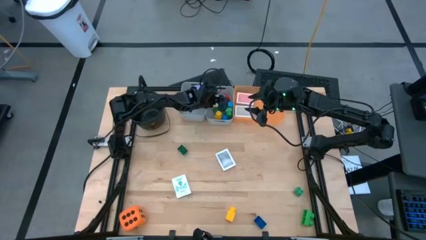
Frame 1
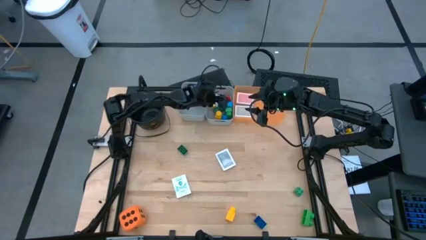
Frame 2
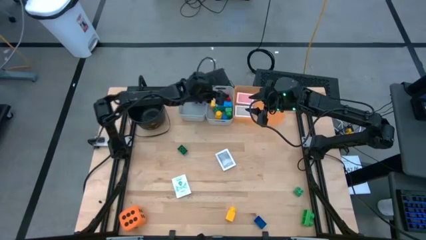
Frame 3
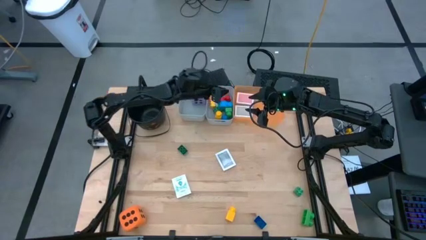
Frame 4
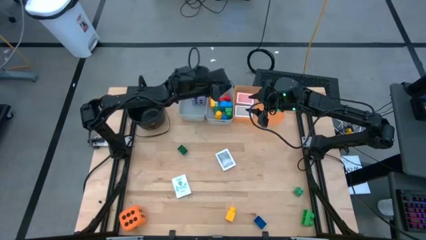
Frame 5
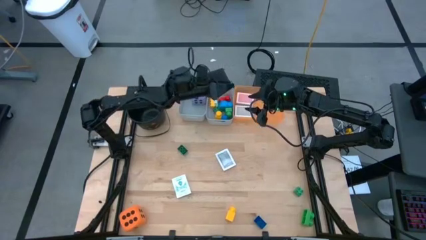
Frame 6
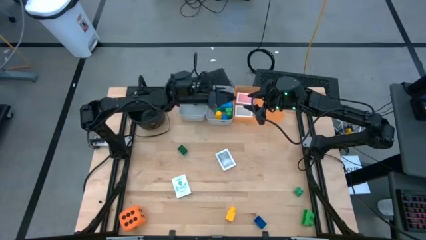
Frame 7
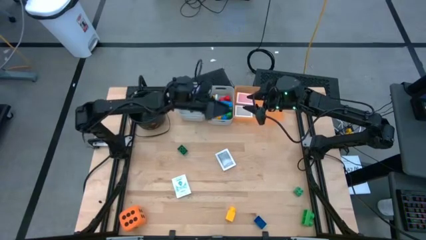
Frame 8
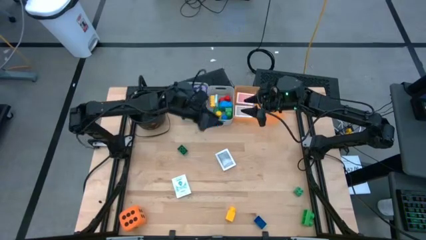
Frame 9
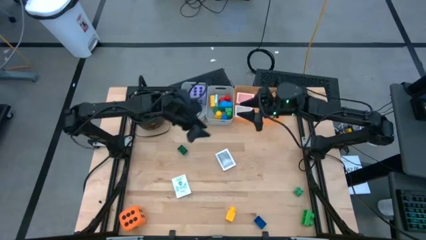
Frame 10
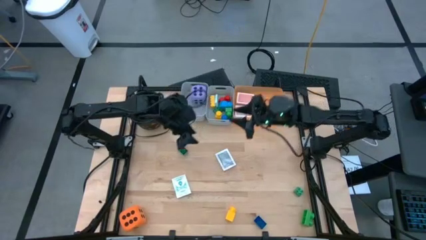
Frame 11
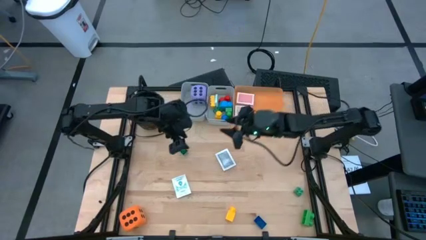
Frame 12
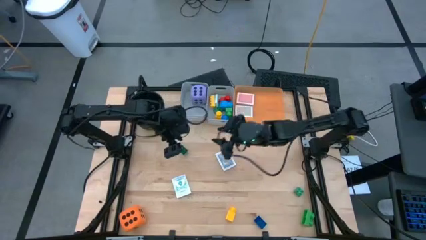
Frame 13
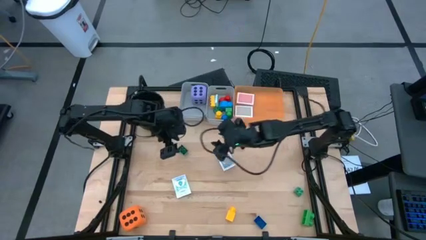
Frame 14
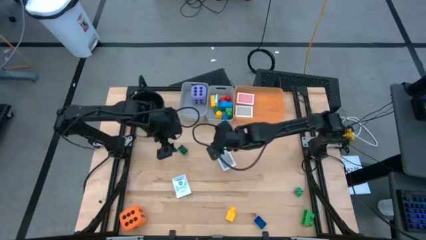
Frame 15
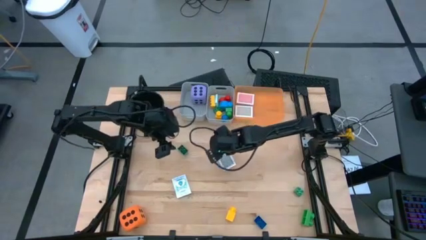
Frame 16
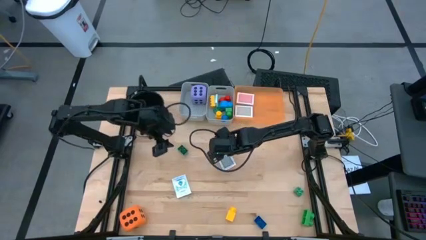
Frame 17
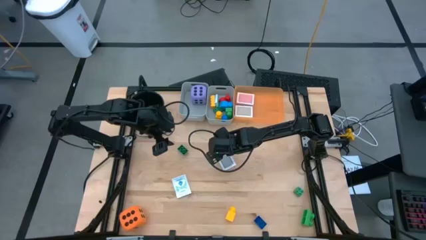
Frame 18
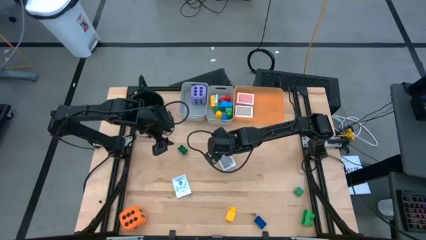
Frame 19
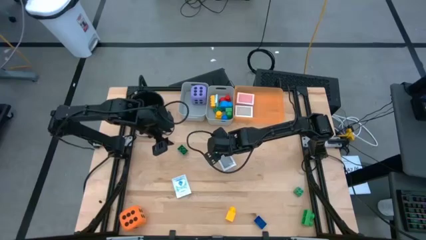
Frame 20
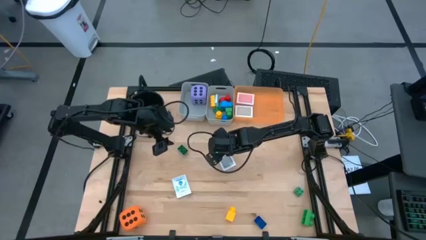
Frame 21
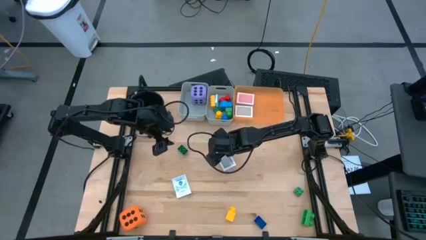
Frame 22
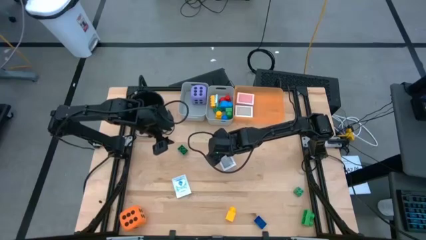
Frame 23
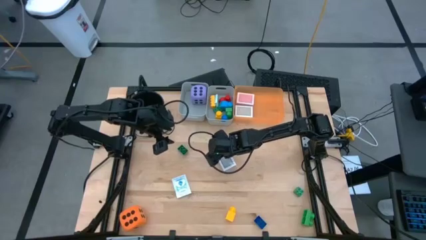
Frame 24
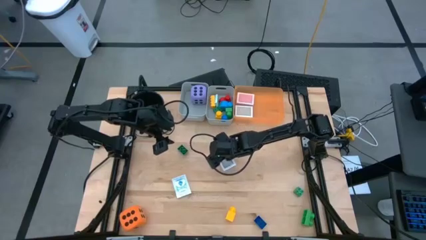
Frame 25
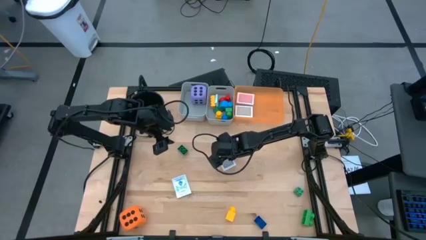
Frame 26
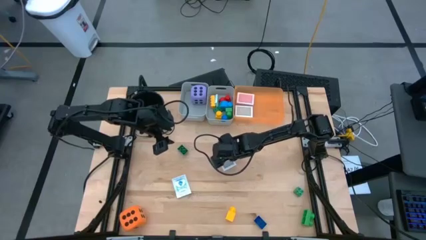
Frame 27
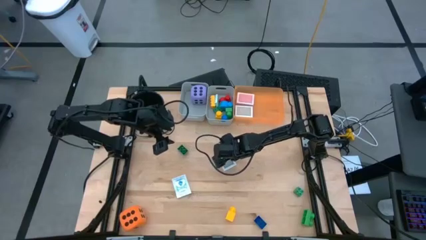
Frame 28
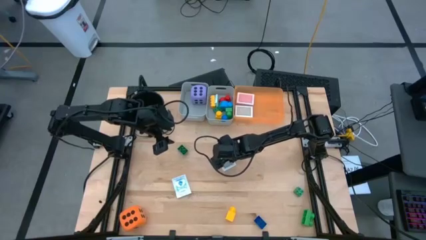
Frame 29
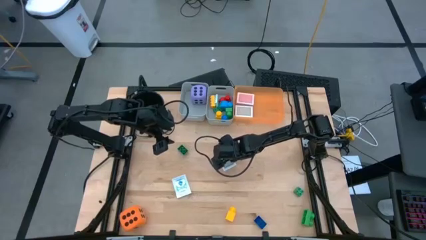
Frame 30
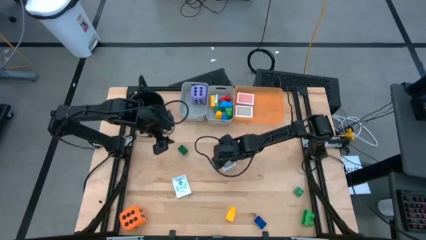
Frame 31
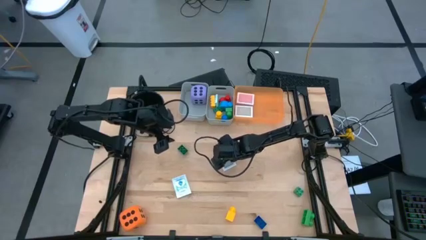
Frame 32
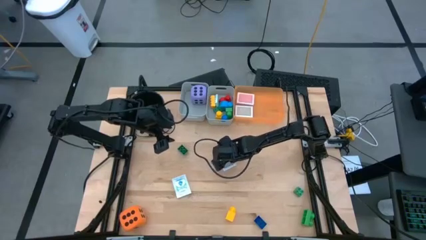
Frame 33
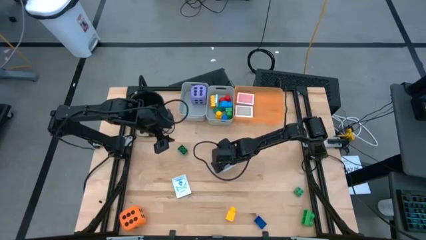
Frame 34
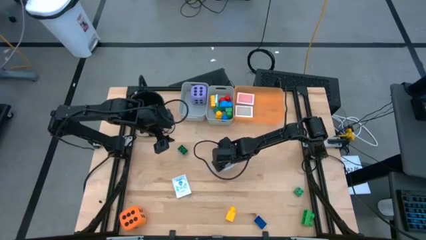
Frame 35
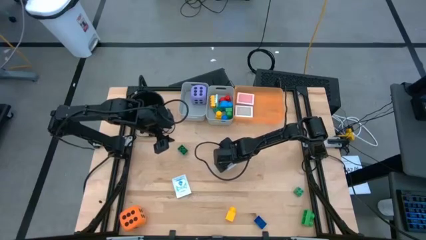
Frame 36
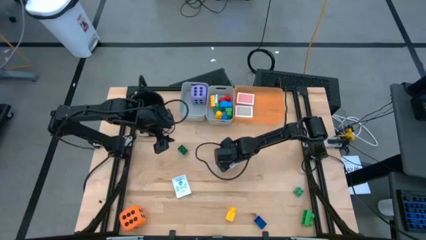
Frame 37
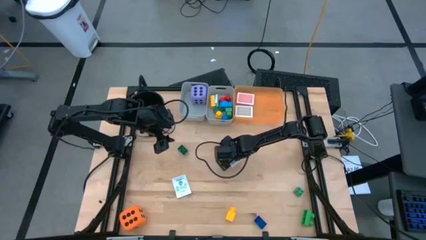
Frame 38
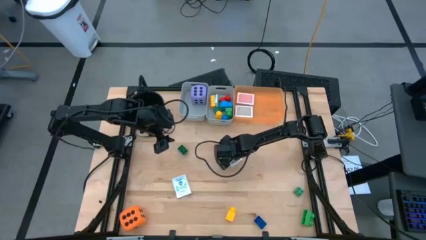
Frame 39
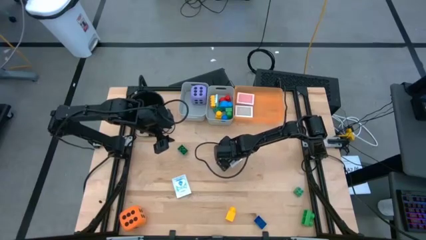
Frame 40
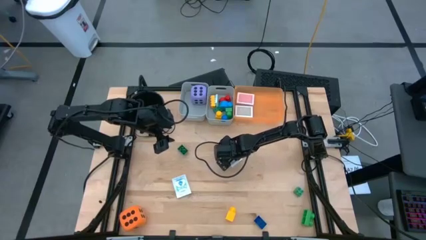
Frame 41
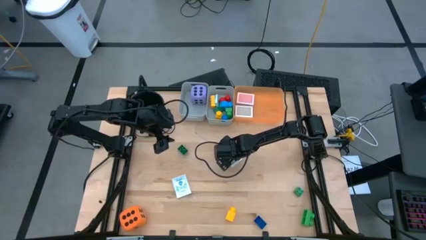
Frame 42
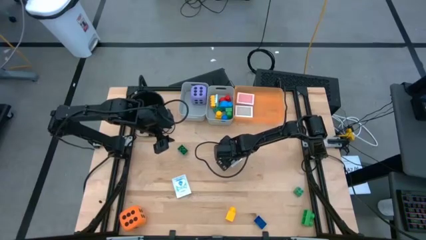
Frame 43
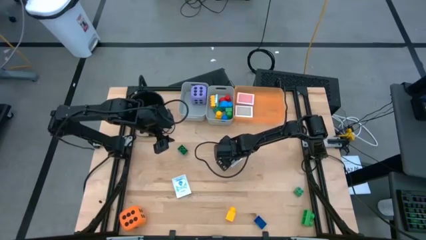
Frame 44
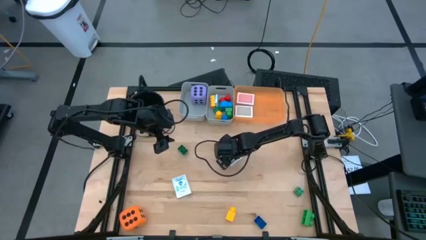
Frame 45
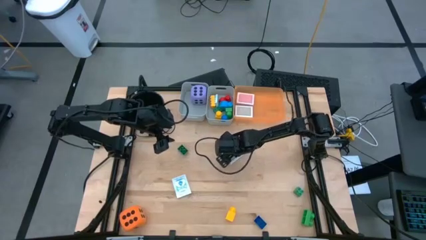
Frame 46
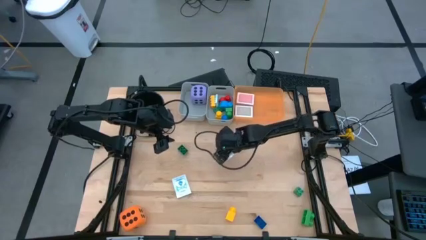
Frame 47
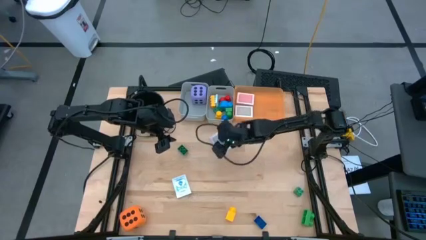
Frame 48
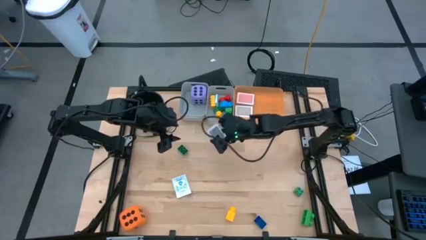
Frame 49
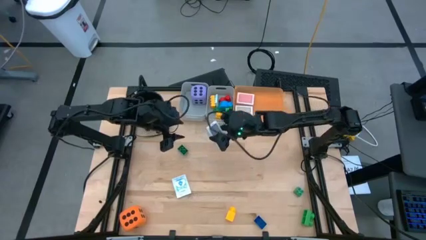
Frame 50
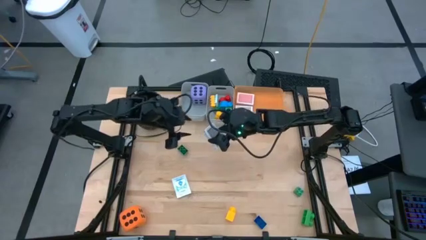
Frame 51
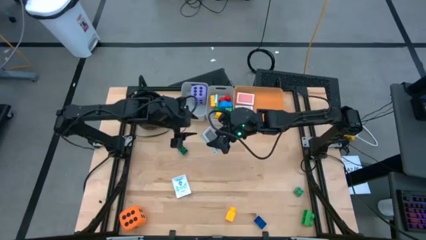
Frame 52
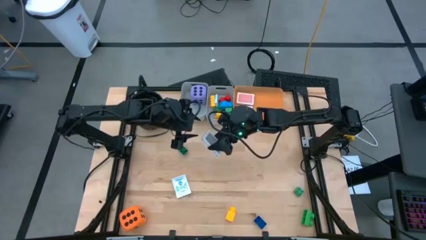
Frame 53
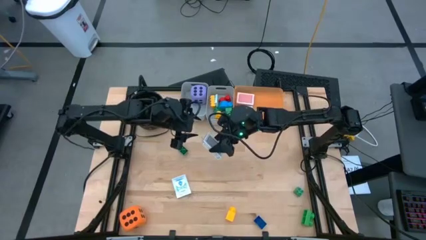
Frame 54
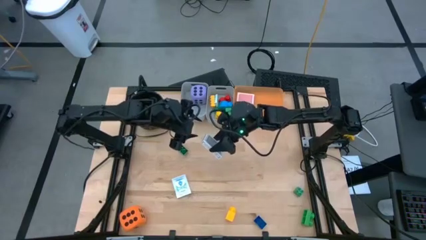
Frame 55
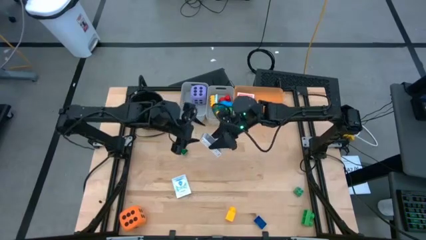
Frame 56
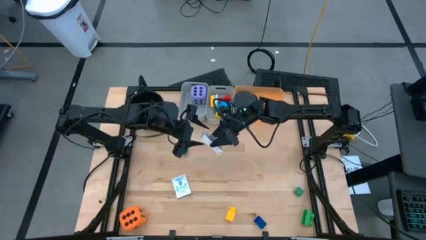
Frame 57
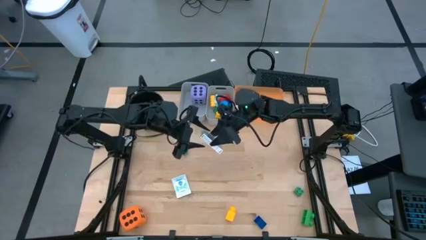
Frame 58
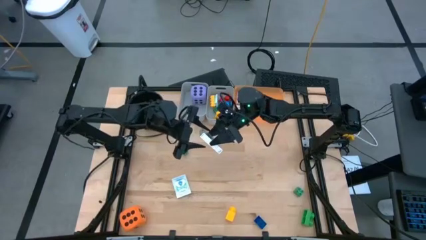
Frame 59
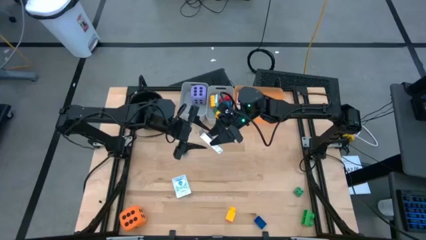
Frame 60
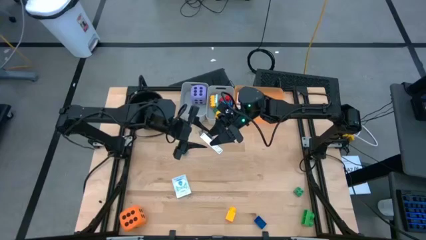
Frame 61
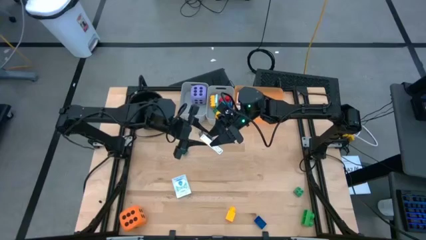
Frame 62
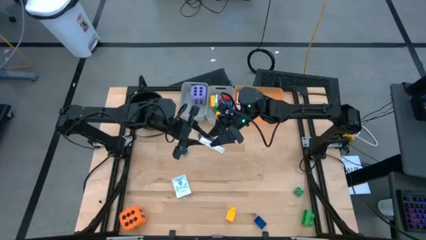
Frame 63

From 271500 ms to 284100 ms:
Task: Pick & Place Toys
Put the black playing card into the orange bin
